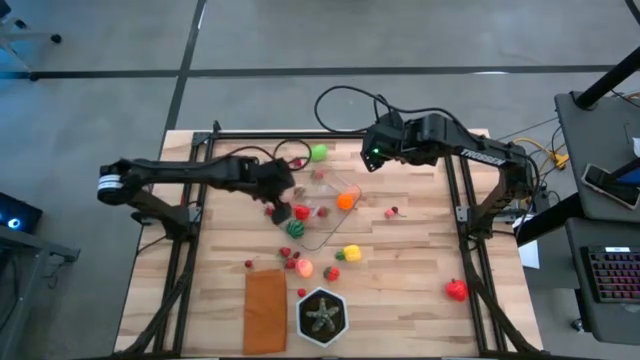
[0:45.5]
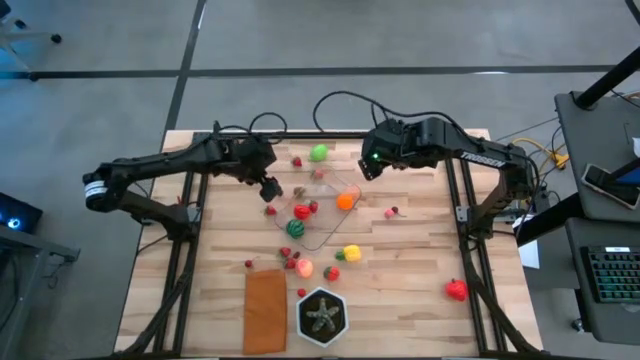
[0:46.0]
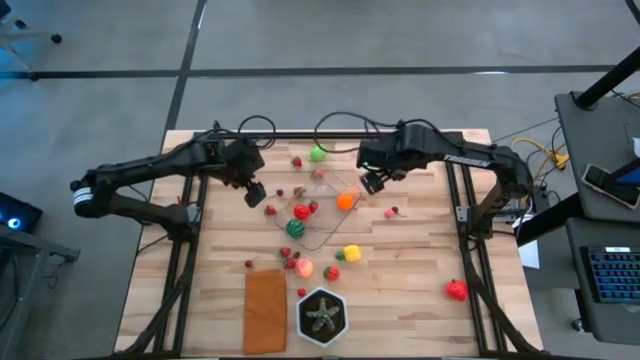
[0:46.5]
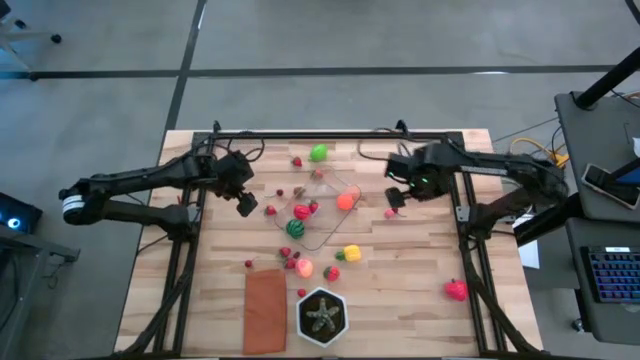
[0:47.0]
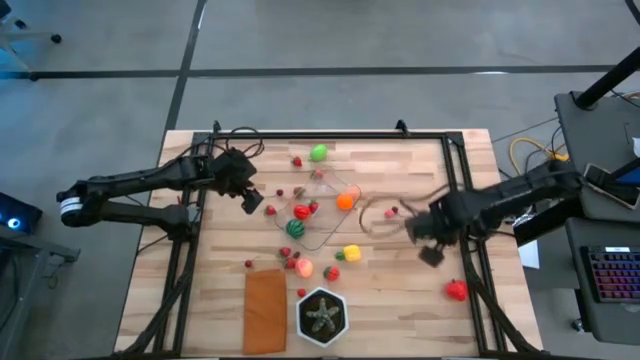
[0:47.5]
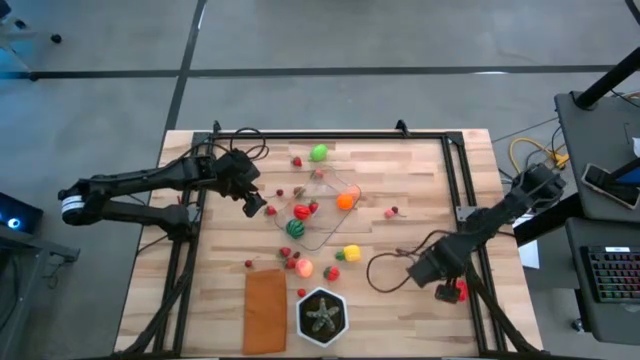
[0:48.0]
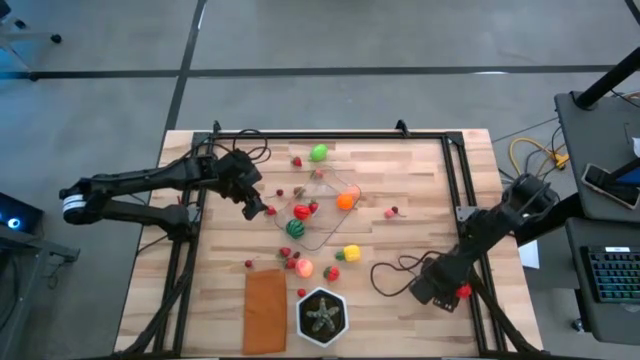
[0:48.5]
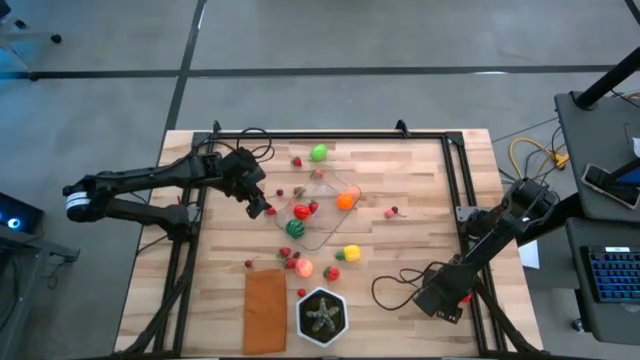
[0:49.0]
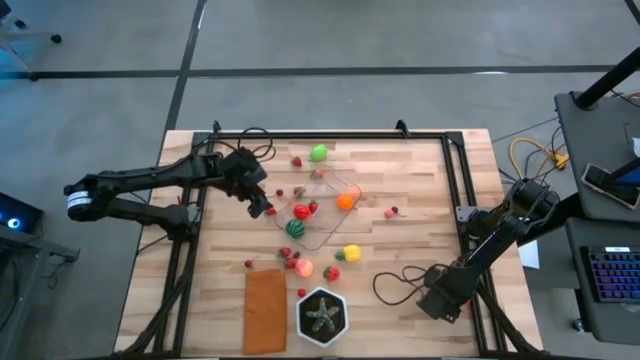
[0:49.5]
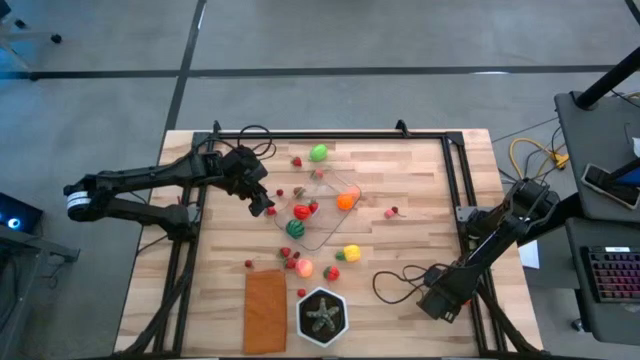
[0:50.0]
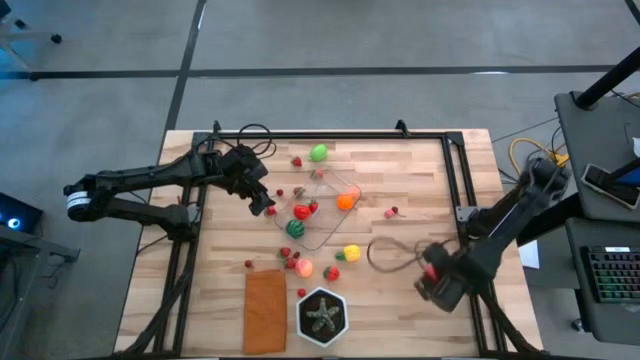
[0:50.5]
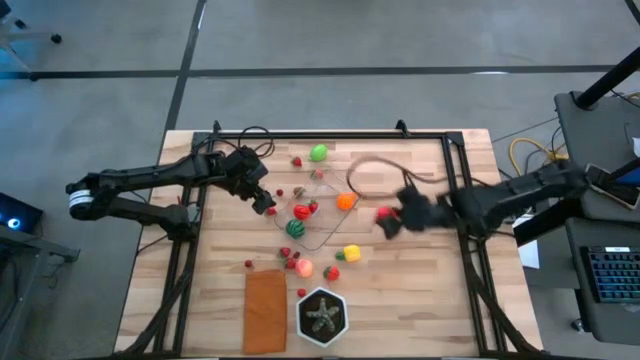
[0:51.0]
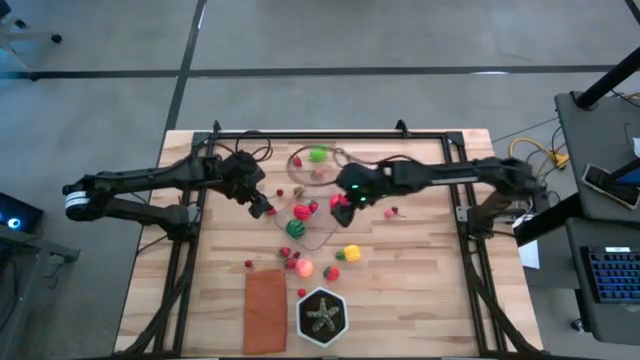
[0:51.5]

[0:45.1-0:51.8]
Task: Pick and placing Produce into tupperware
Put the red apple into the transparent bin

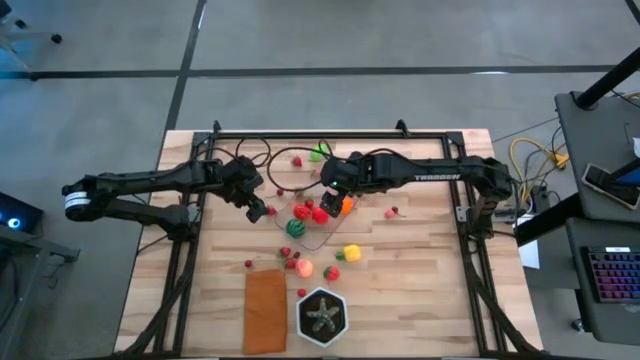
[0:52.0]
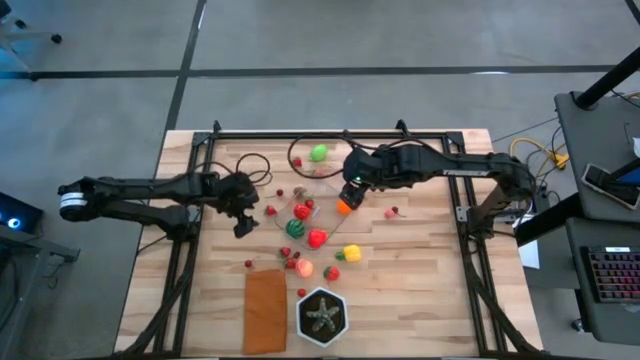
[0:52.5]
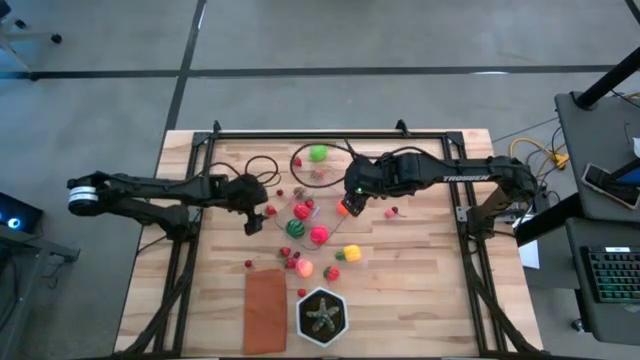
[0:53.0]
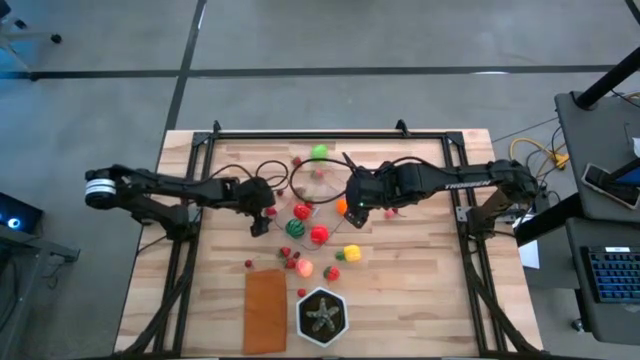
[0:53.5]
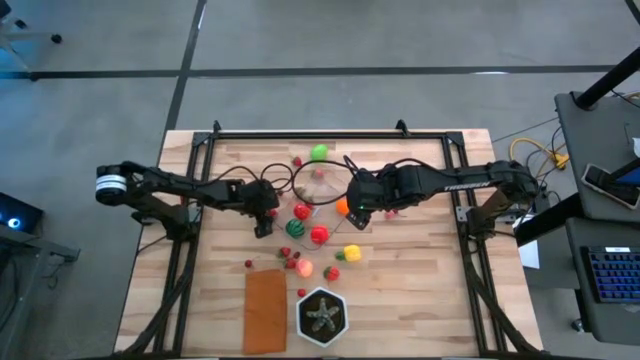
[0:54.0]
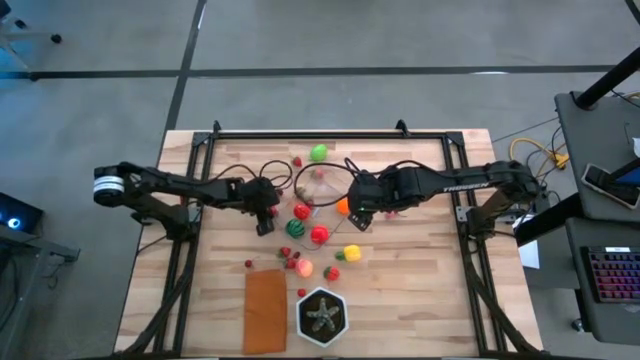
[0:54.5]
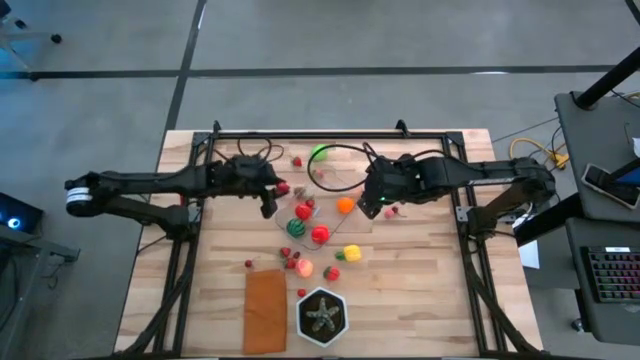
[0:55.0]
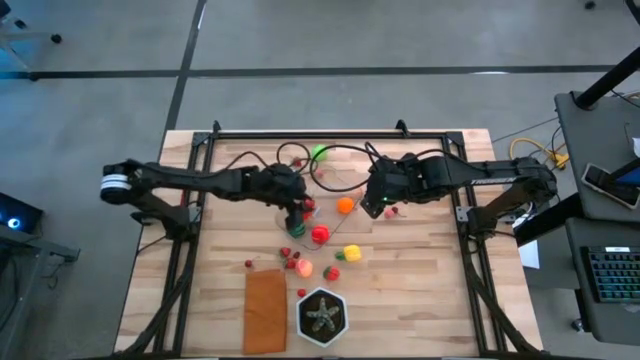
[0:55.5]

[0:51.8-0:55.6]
Put the red strawberry into the transparent bin

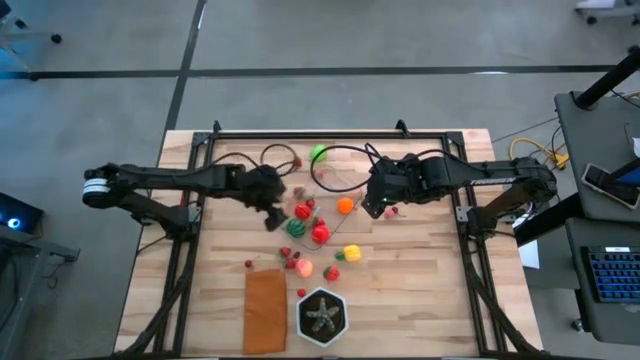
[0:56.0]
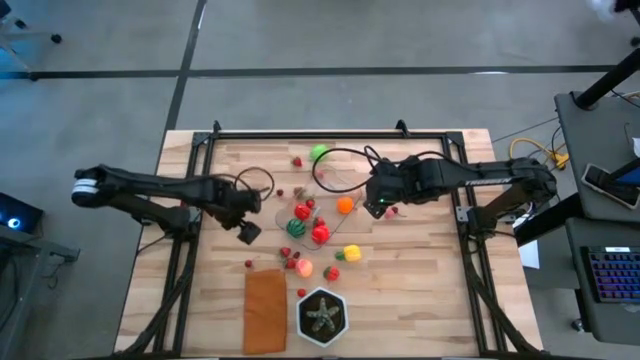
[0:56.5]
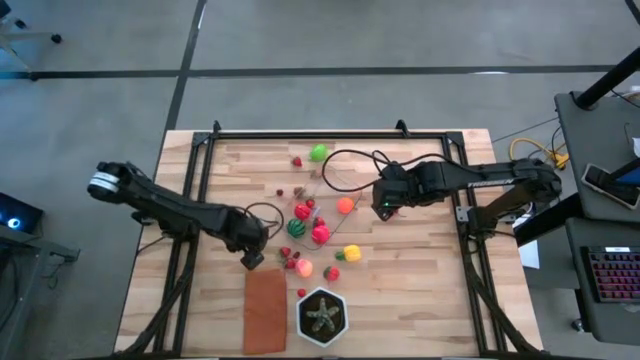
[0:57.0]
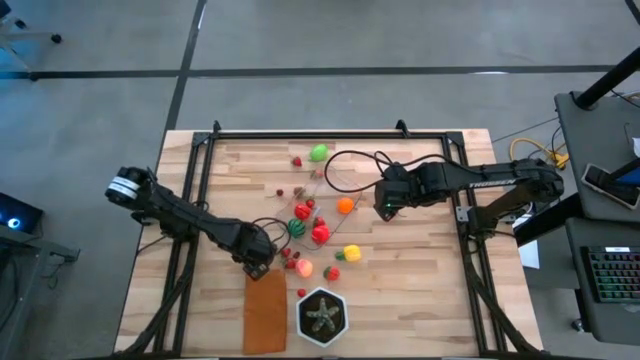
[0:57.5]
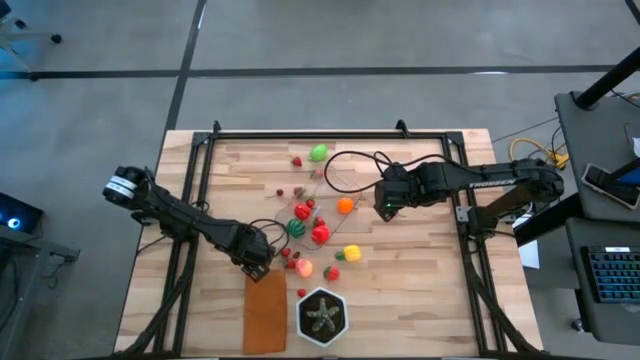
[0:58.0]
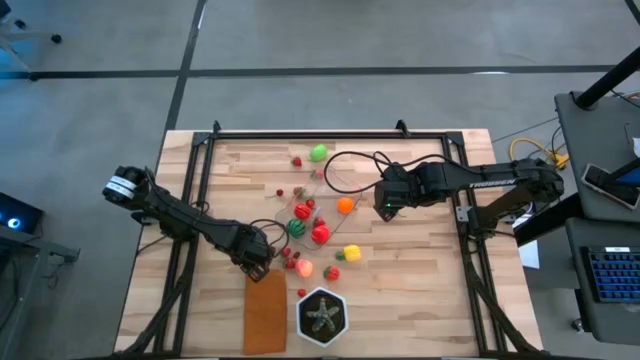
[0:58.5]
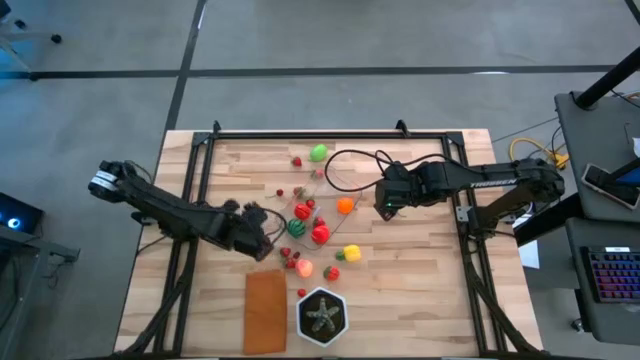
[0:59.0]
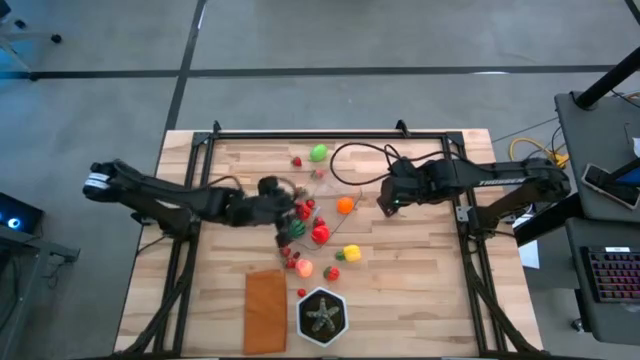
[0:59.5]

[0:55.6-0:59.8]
Put the red cherry into the transparent bin

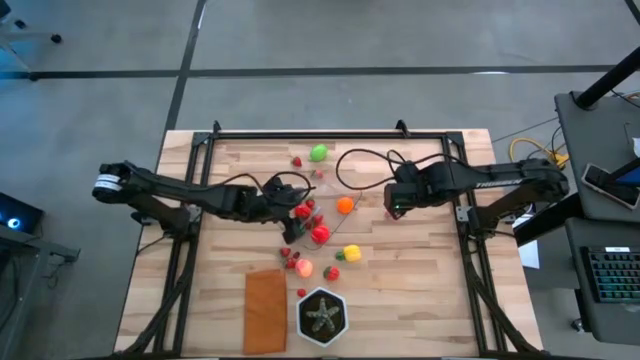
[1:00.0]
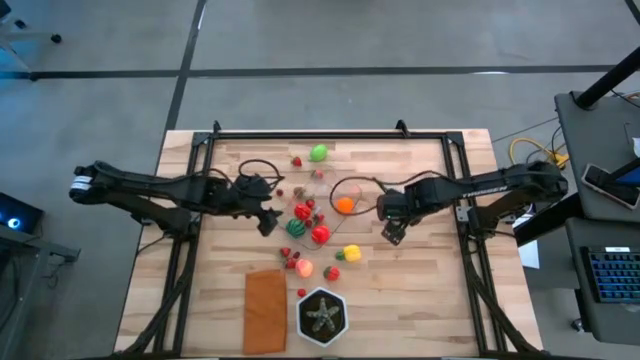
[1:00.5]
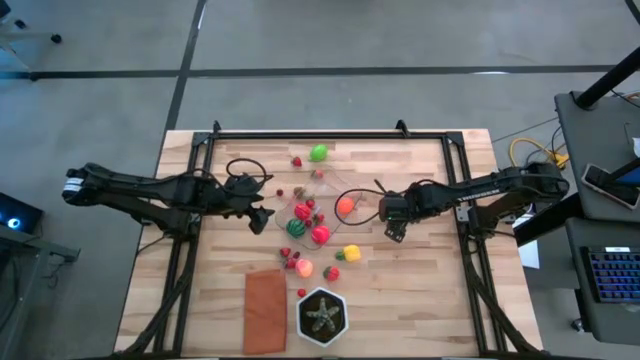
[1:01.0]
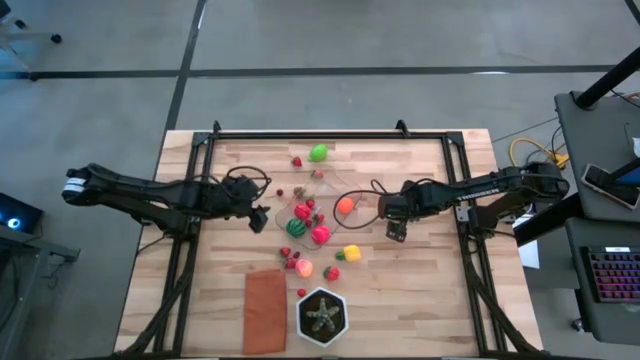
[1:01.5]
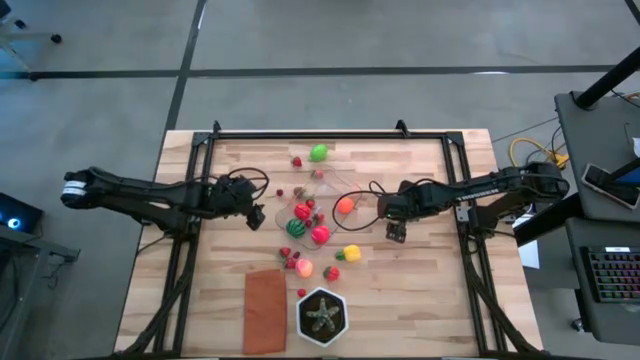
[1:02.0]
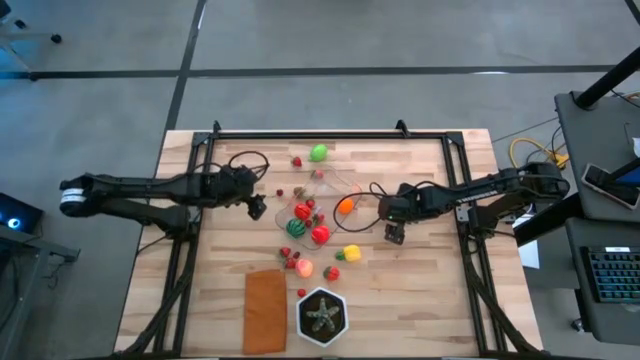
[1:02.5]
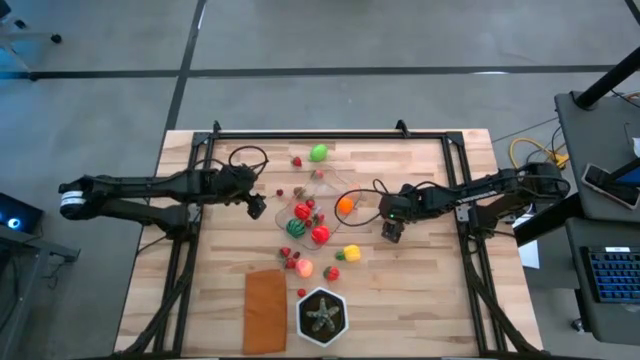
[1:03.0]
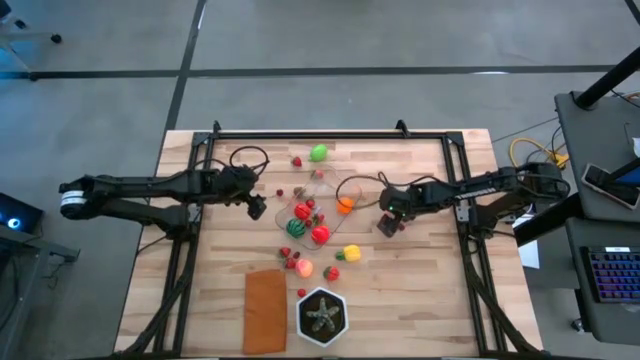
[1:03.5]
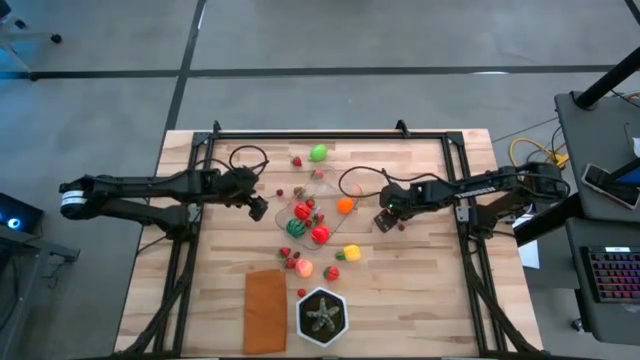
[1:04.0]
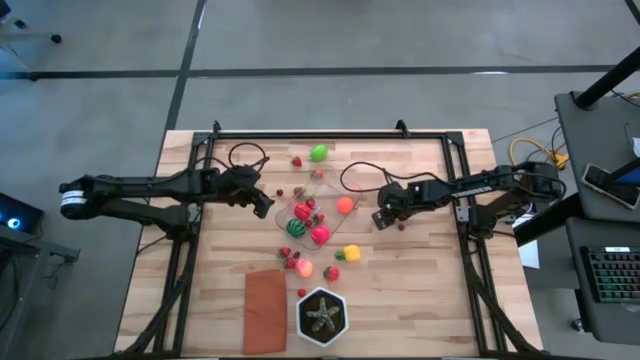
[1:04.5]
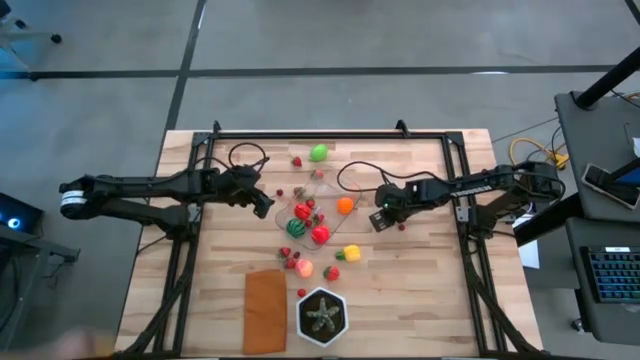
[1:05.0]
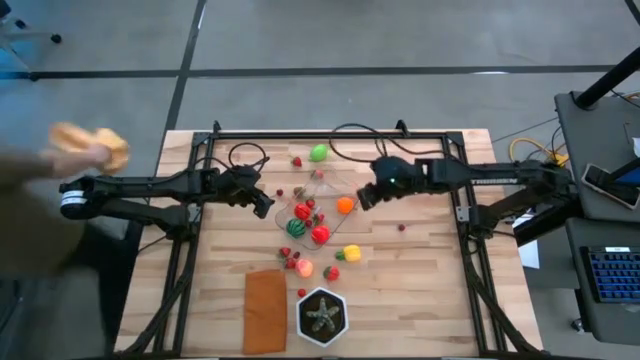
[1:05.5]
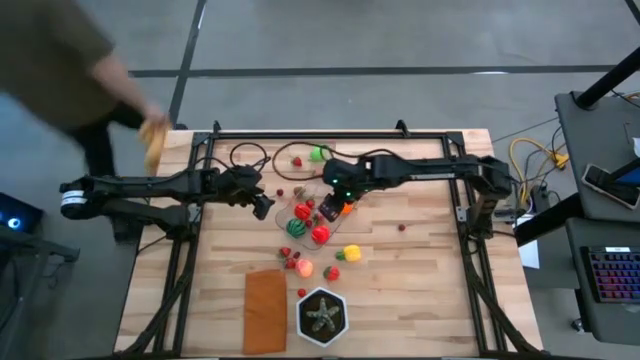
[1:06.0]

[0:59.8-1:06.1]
Put the pink peach into the transparent bin

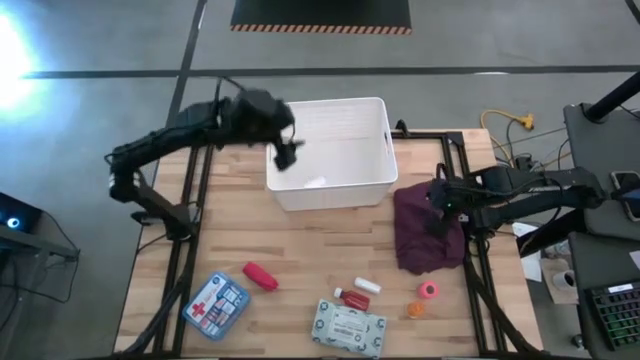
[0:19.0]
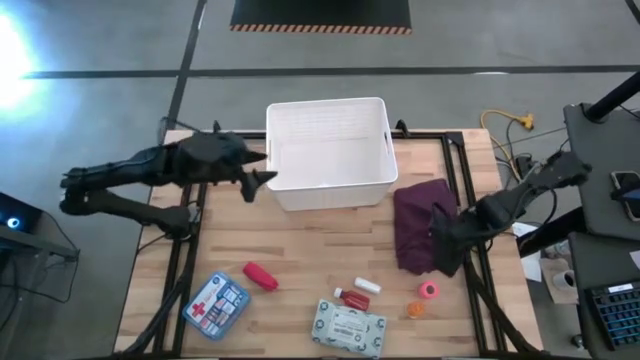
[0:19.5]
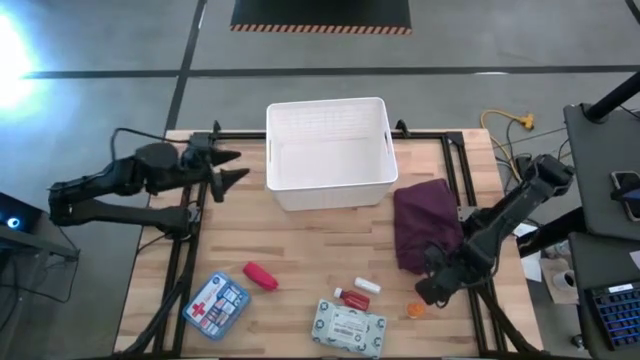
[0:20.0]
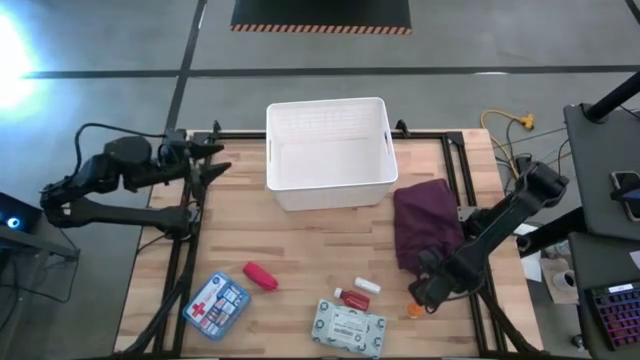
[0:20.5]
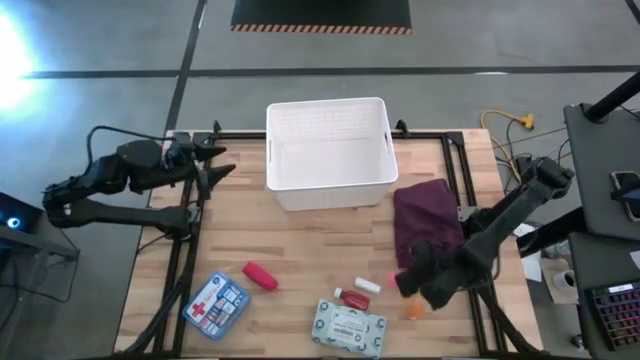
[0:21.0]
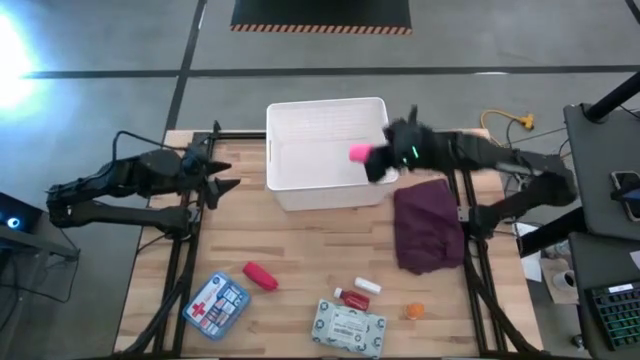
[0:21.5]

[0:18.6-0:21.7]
Task: Pick & place medical supplies in basket/bin
Put the pink bandage into the white bin
